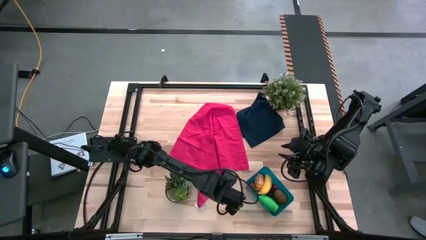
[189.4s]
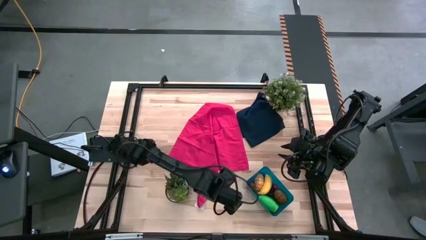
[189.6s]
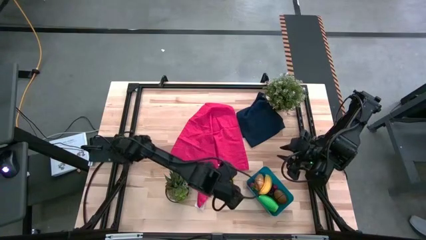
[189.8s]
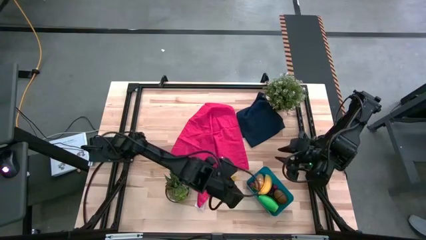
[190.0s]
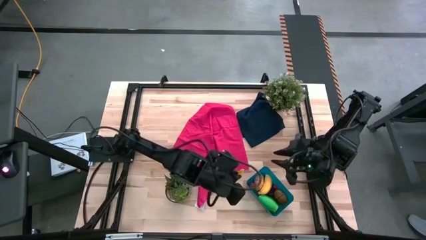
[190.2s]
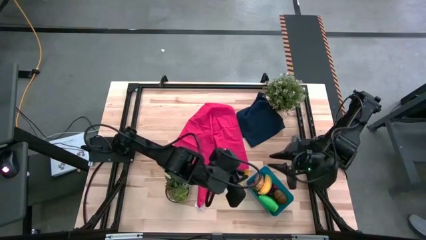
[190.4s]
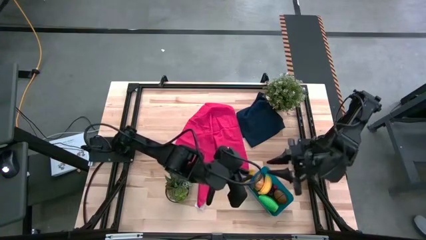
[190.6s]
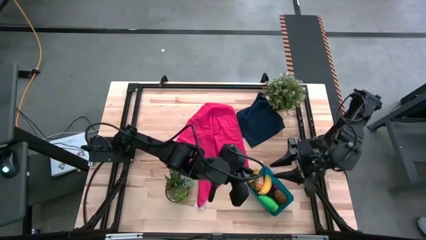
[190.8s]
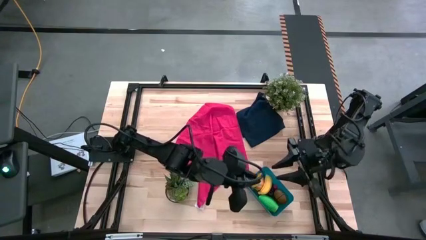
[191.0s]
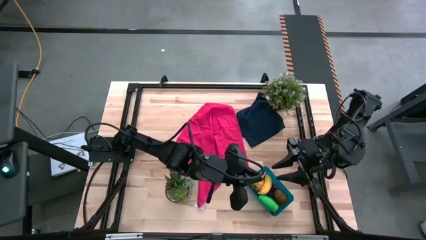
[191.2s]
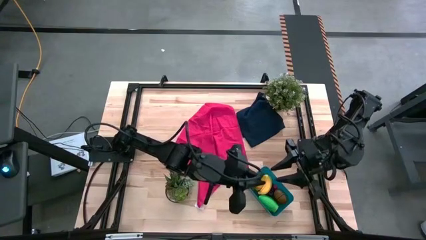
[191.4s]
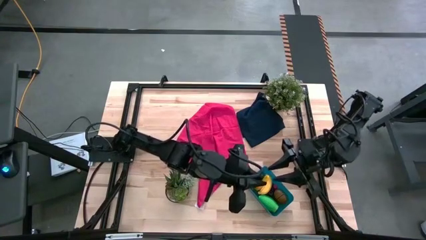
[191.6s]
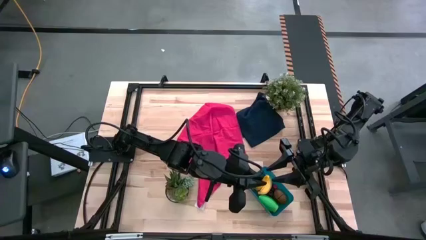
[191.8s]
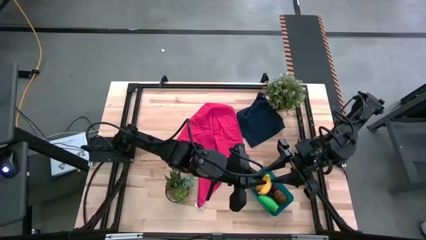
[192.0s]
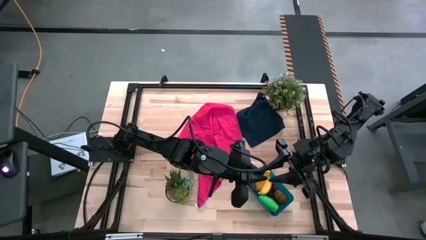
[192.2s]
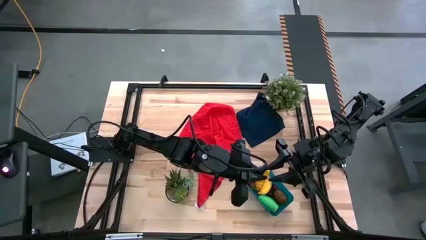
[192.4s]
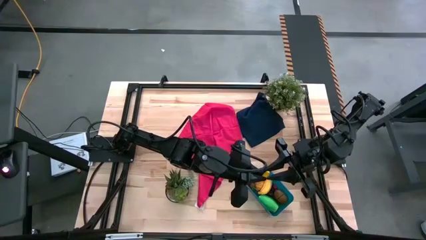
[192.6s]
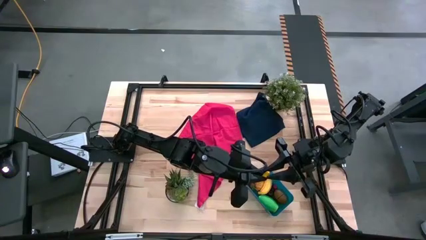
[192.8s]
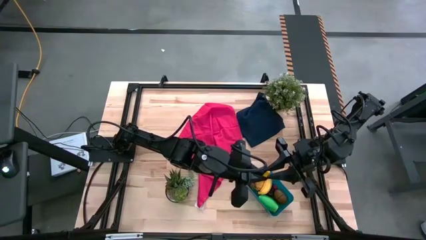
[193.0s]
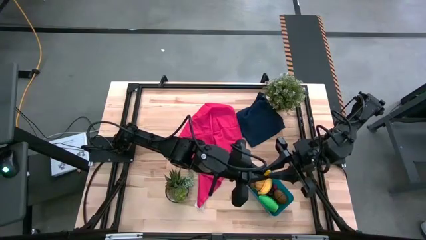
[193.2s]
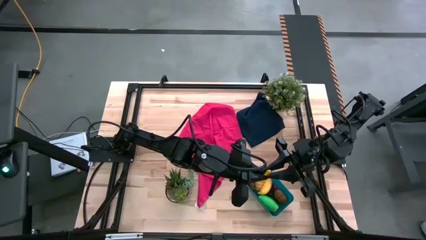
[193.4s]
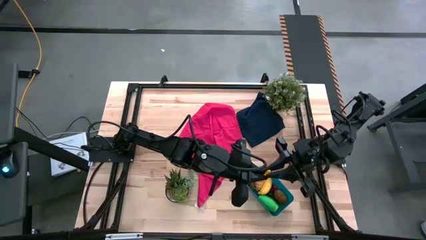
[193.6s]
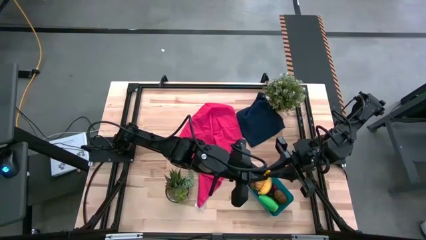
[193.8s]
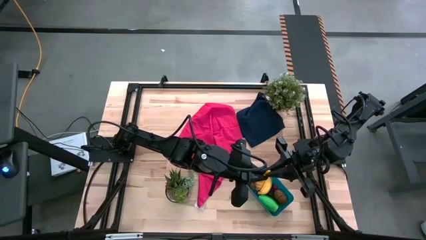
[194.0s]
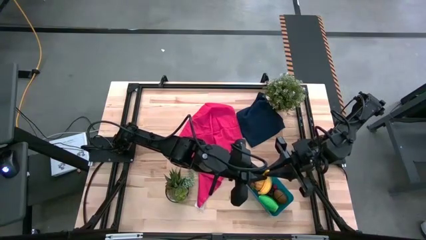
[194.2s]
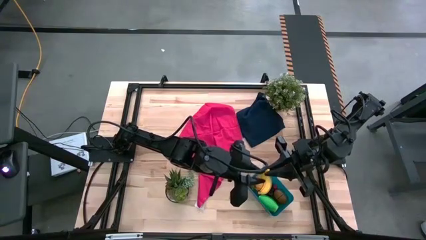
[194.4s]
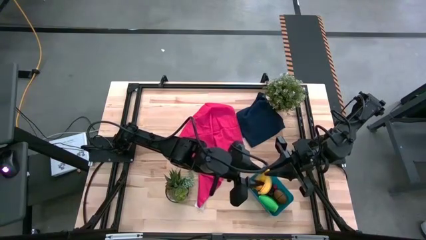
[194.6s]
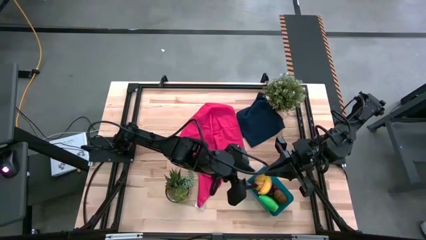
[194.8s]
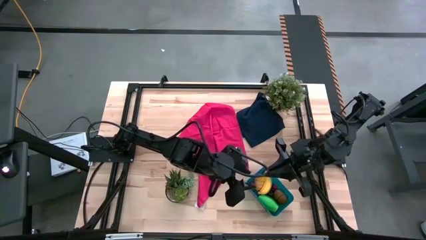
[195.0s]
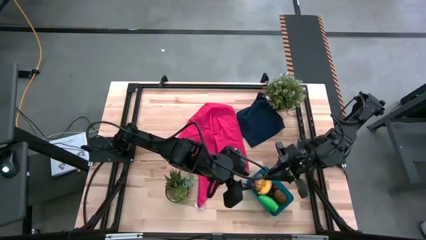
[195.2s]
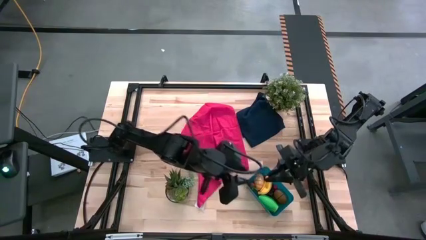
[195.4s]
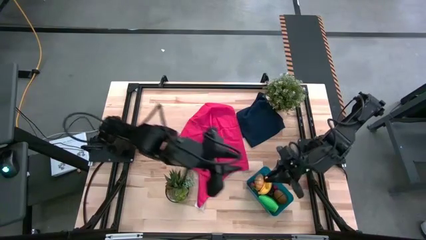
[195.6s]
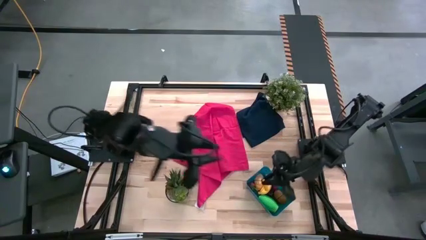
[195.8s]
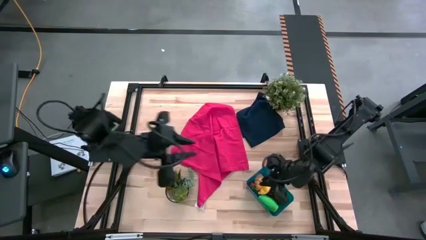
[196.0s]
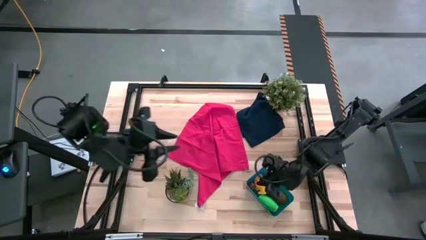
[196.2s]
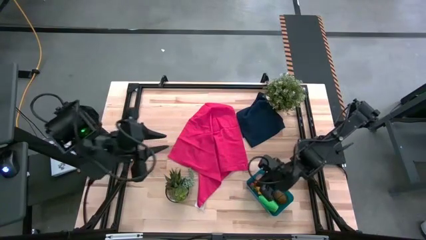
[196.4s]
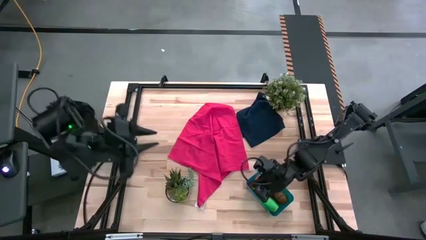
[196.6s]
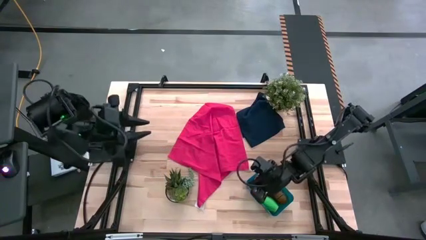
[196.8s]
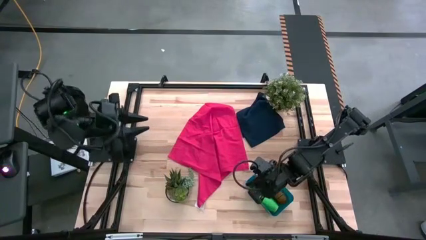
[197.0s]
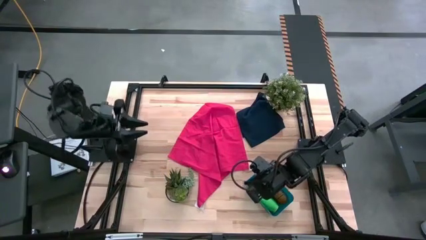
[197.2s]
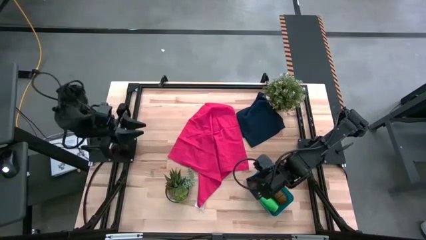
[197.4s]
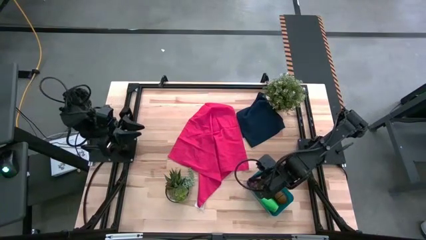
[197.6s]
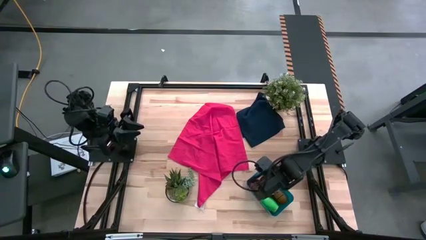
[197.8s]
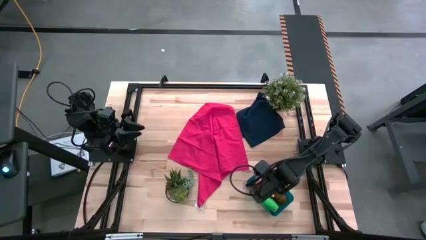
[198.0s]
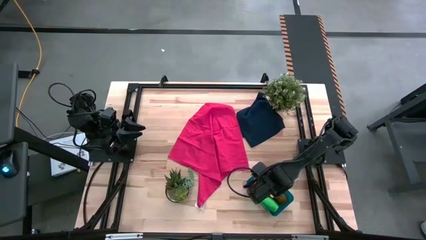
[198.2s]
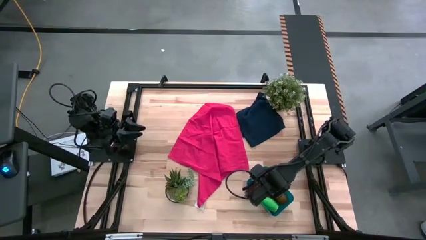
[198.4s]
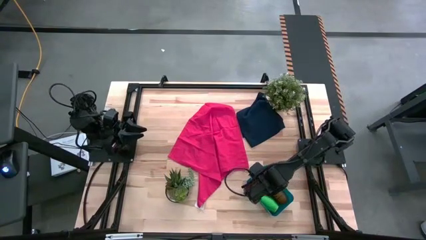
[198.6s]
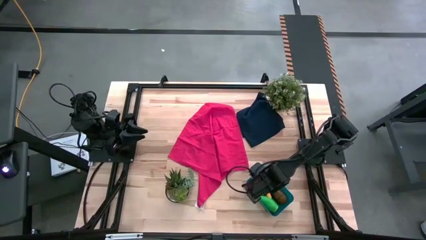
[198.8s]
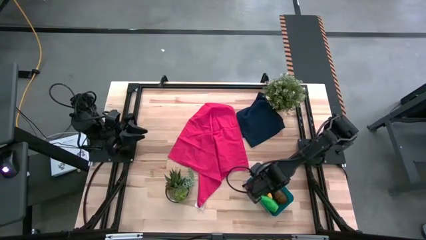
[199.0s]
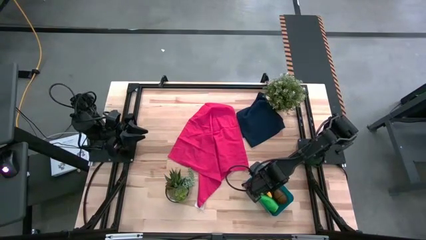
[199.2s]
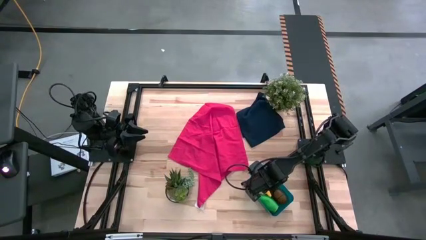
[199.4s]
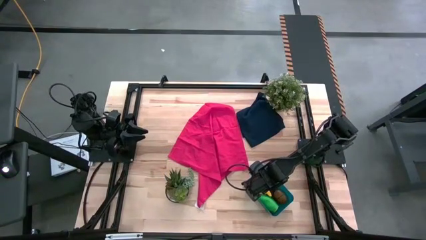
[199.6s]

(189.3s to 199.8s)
Task: Pick and placing Produce into tupperware
Put the yellow corn into the blue bin
